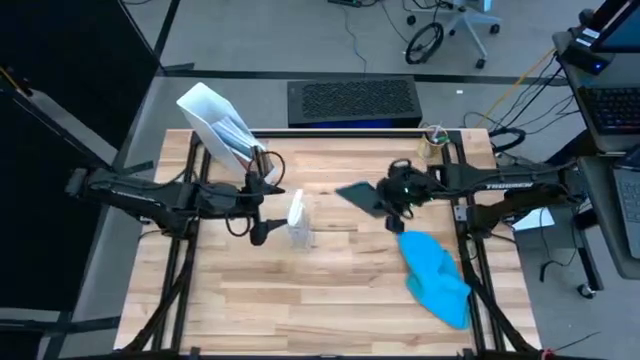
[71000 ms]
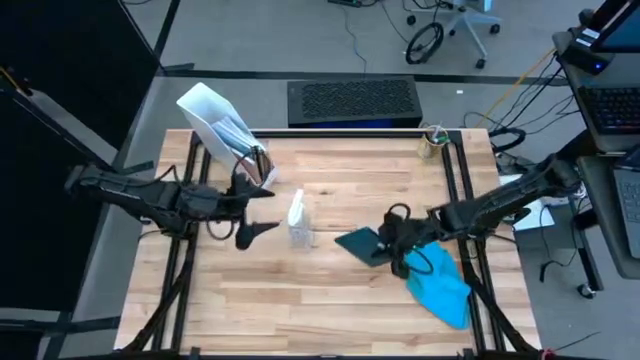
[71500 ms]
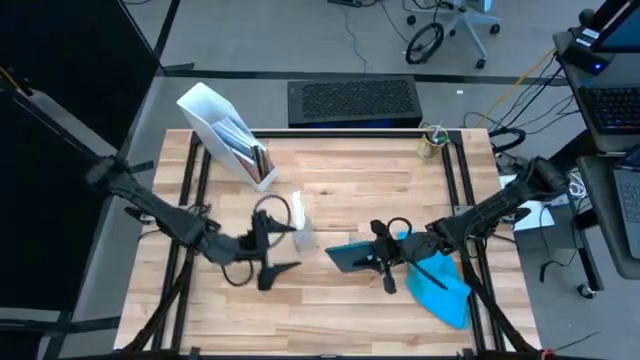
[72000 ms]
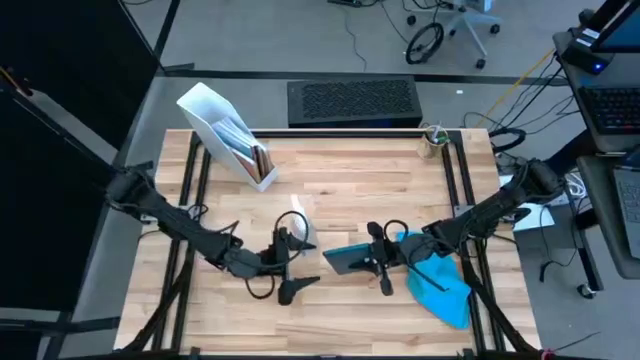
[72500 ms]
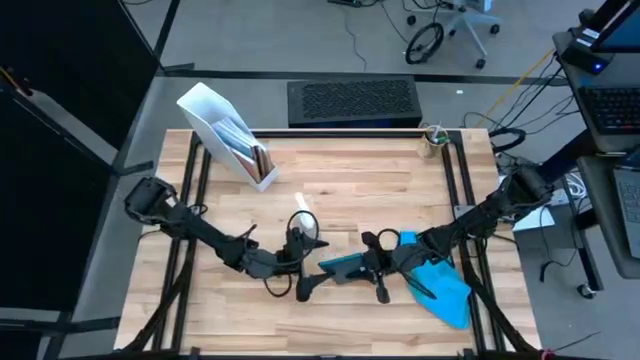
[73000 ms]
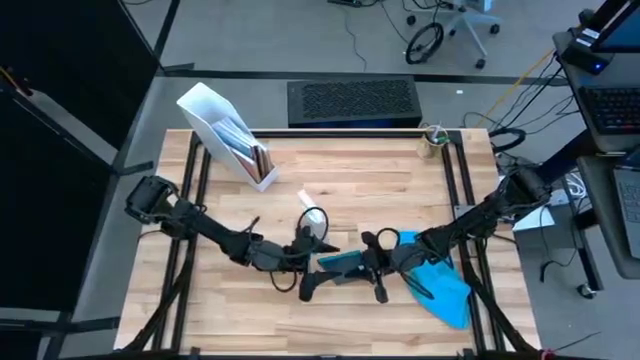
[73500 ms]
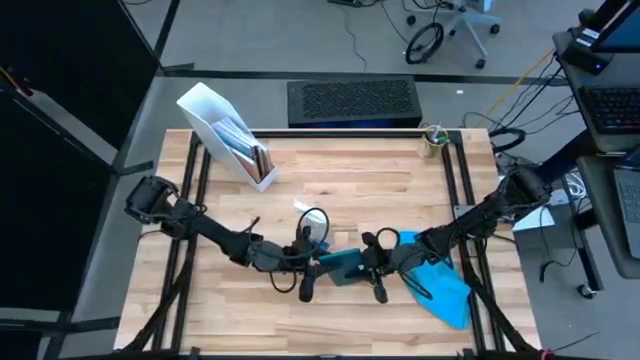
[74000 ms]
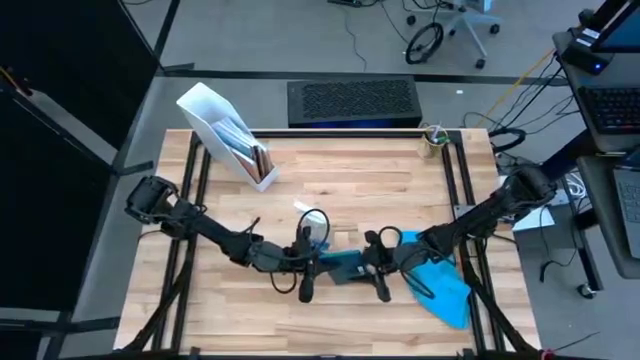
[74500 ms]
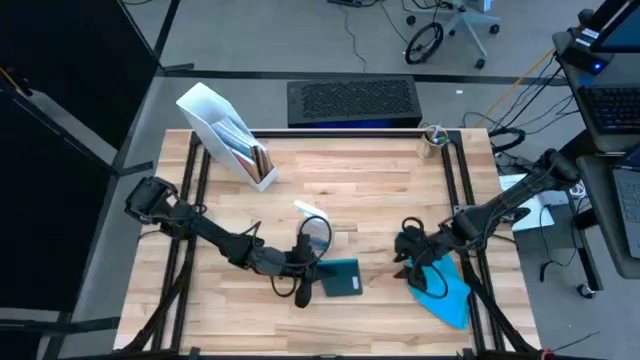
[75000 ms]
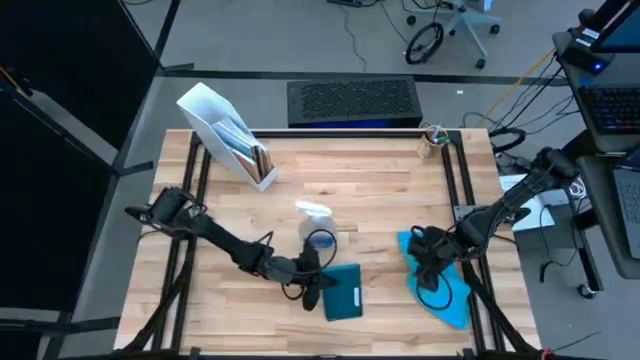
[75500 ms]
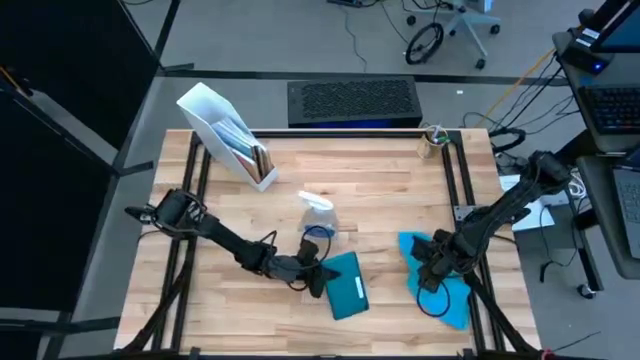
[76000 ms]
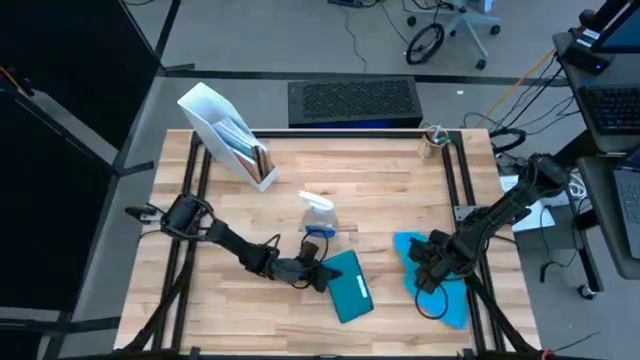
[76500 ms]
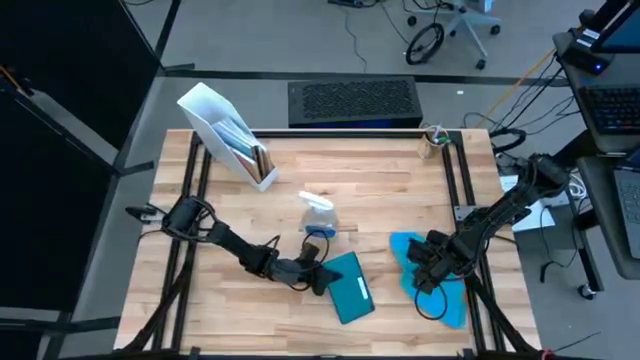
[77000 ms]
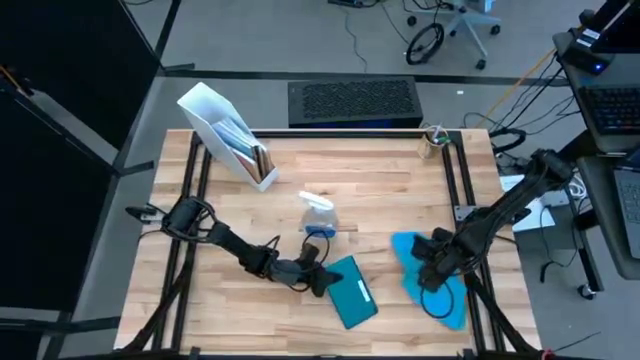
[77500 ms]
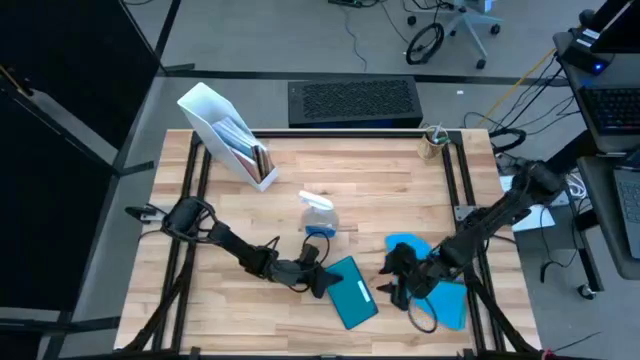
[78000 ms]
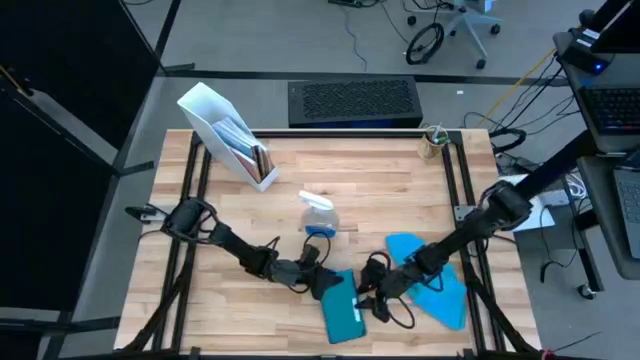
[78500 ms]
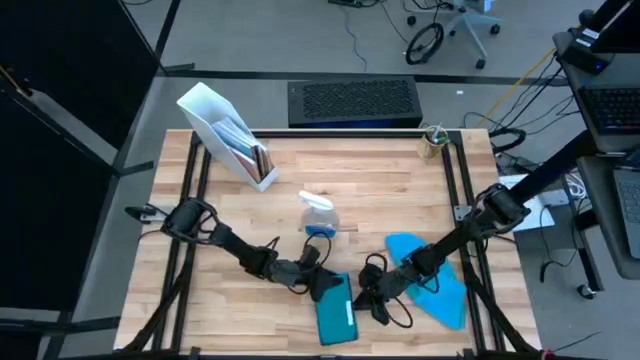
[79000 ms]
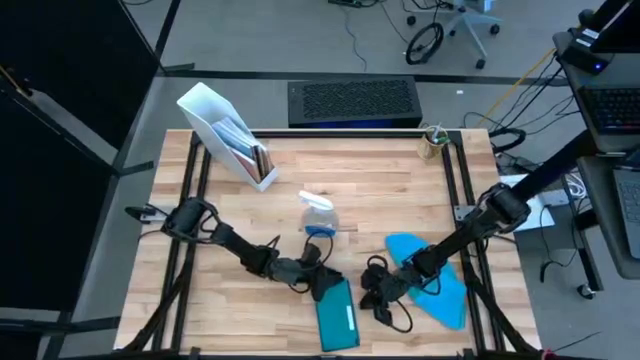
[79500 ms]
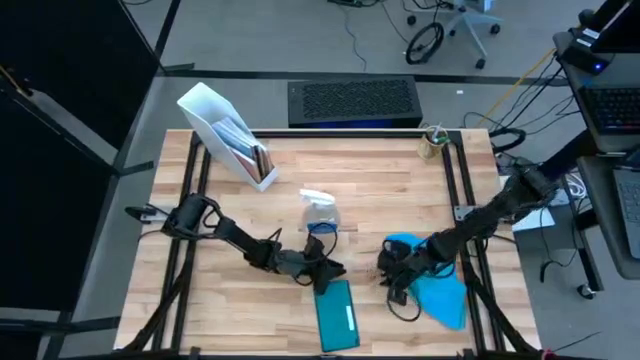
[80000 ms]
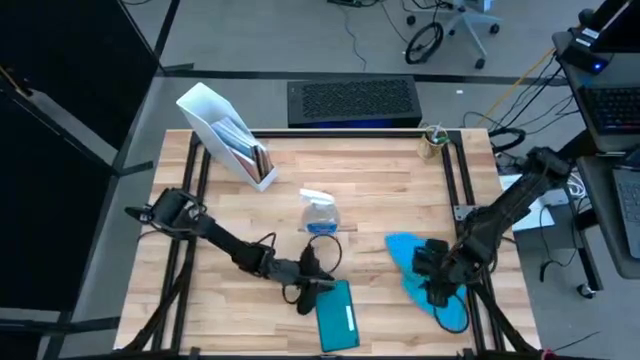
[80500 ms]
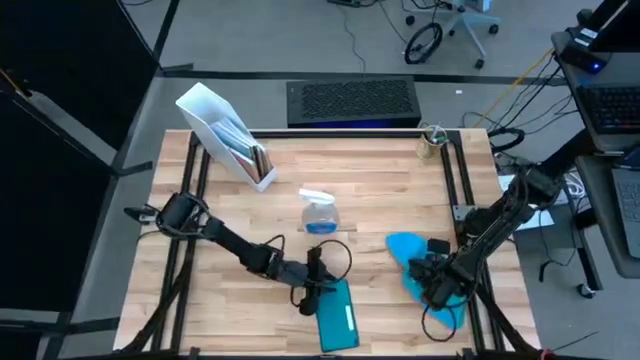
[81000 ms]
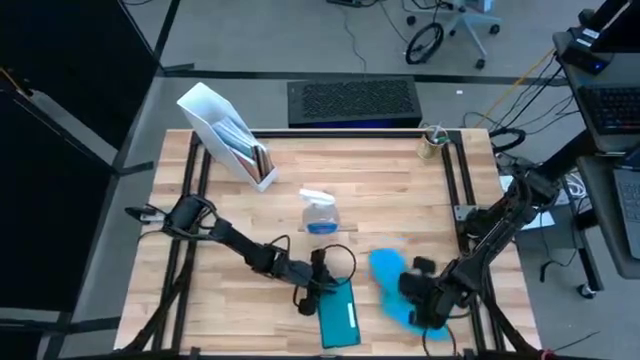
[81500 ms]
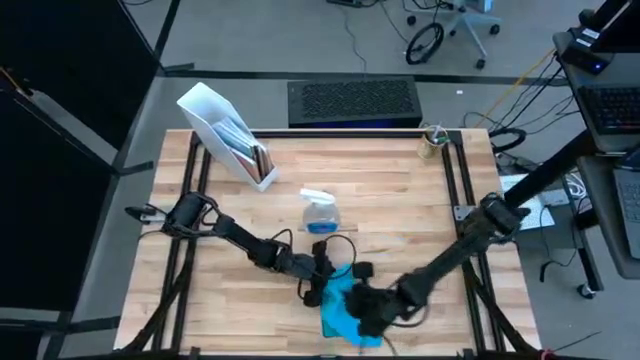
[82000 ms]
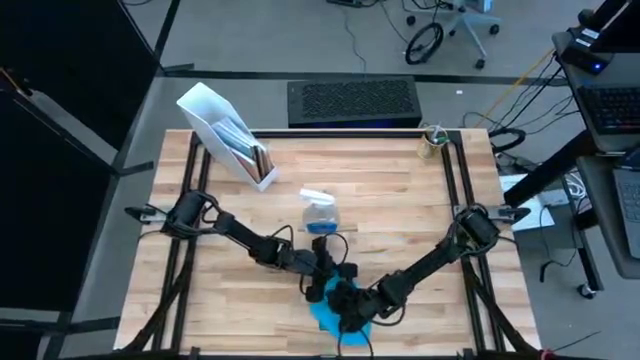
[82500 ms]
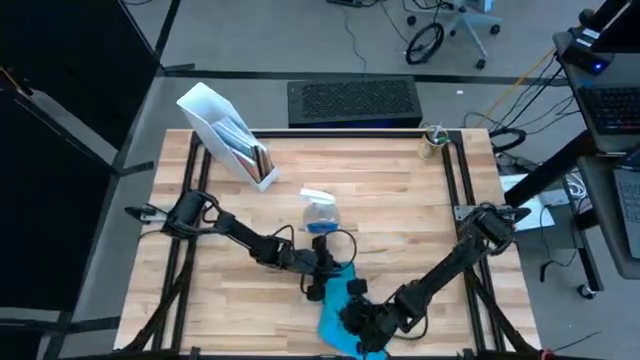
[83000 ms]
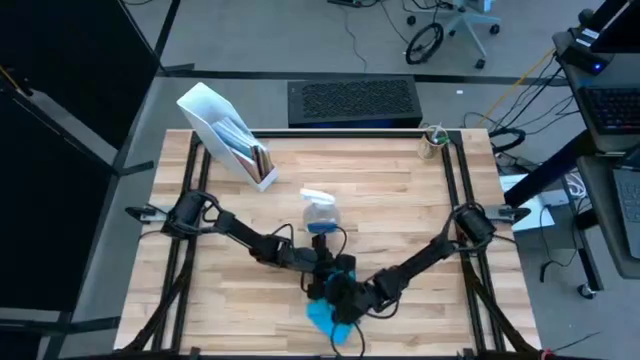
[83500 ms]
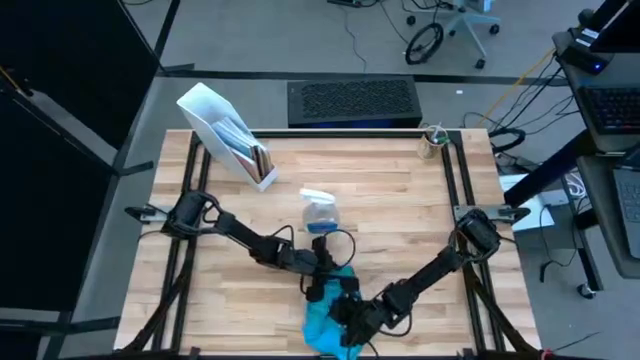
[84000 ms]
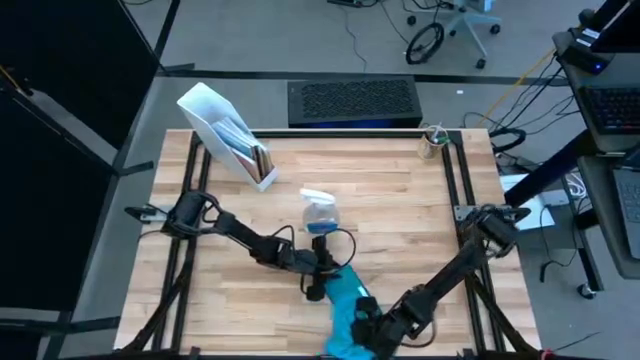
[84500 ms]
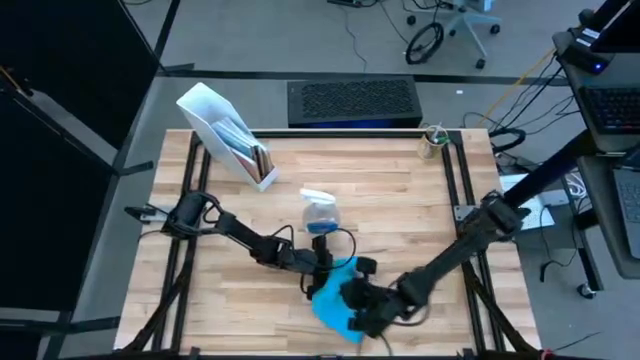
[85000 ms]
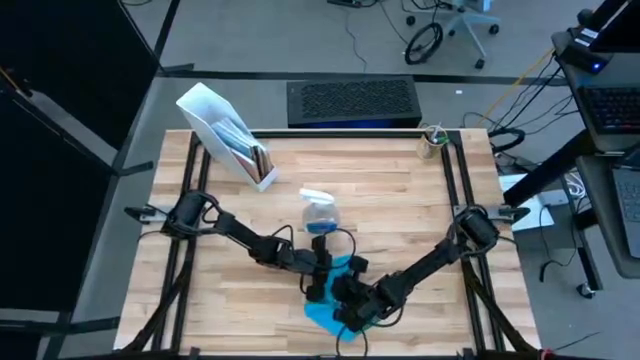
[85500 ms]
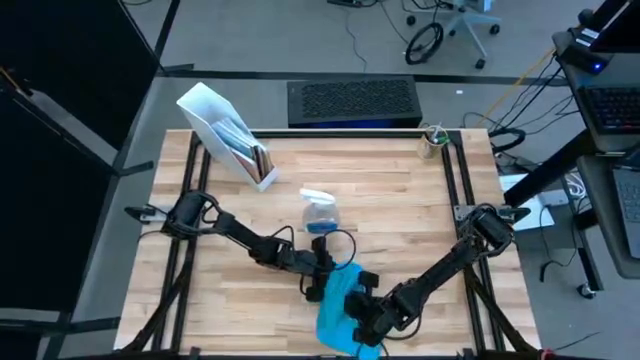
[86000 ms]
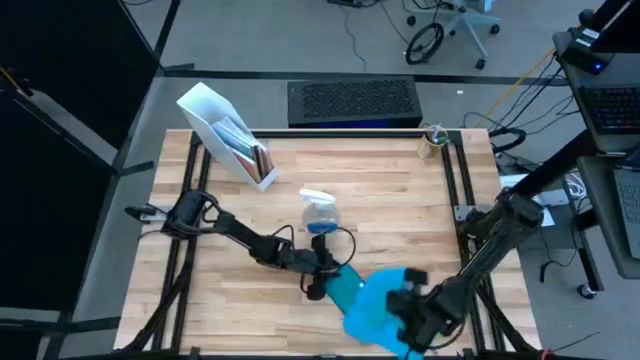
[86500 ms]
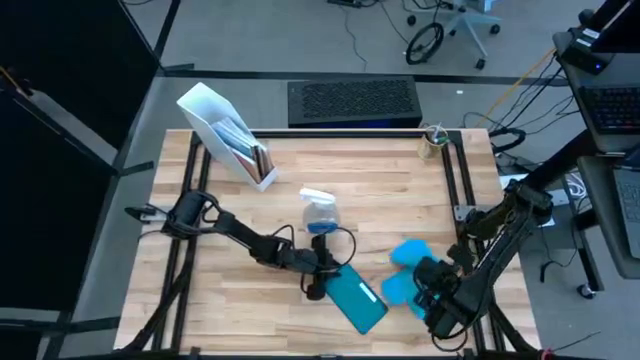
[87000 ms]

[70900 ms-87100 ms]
Task: Apply microfiber cloth
Wipe the back of the blue tablet with the blue microfiber cloth

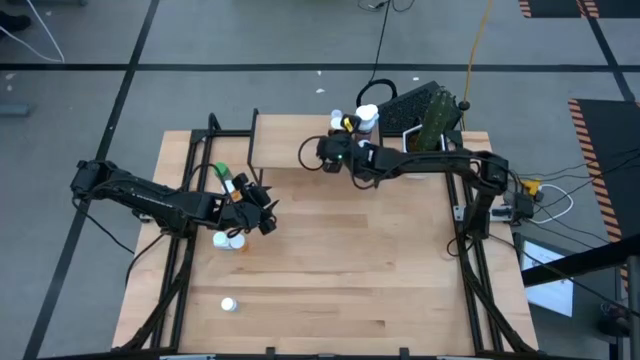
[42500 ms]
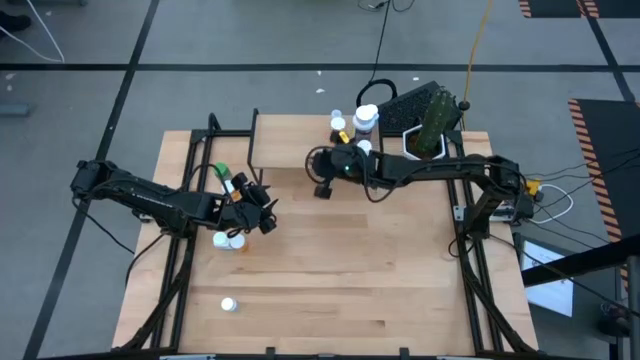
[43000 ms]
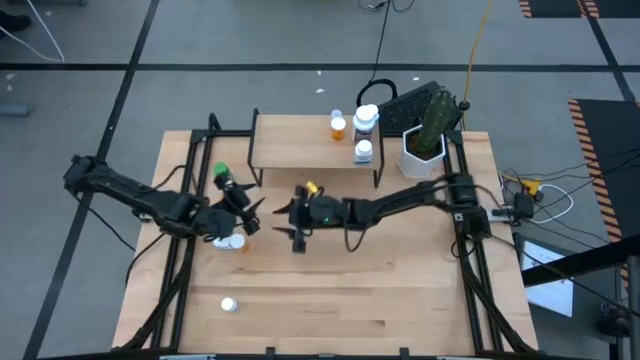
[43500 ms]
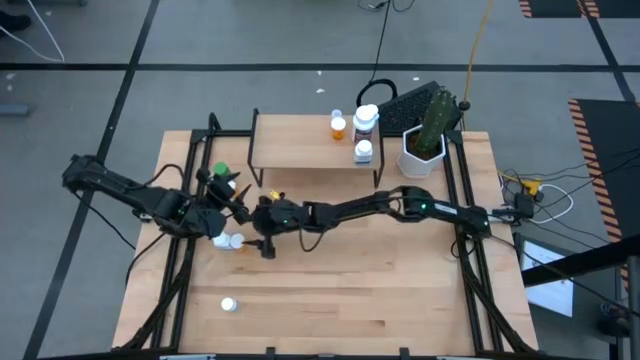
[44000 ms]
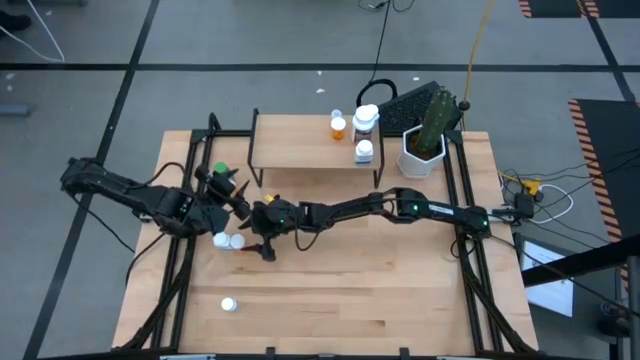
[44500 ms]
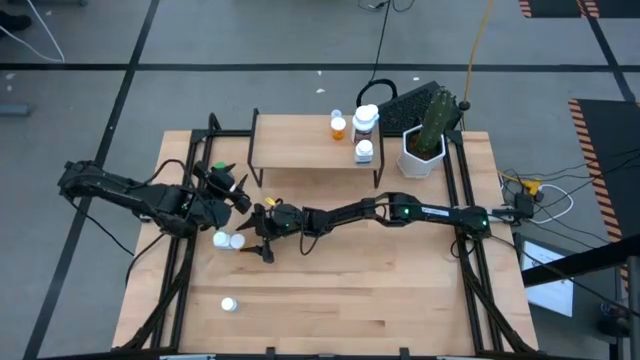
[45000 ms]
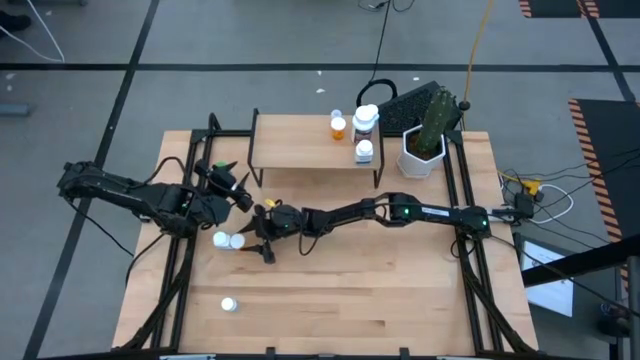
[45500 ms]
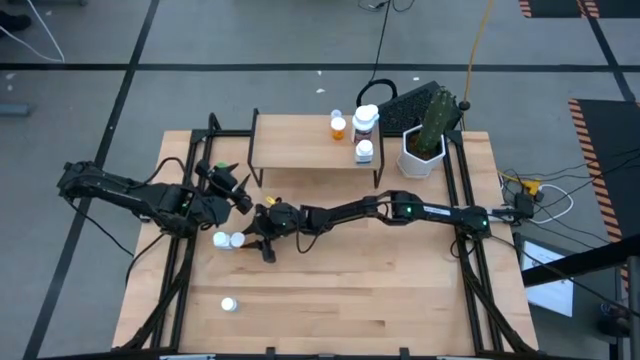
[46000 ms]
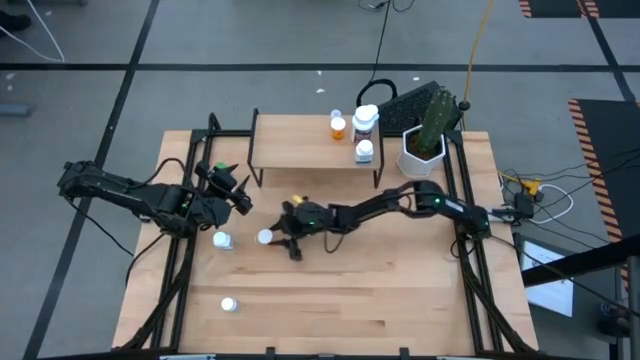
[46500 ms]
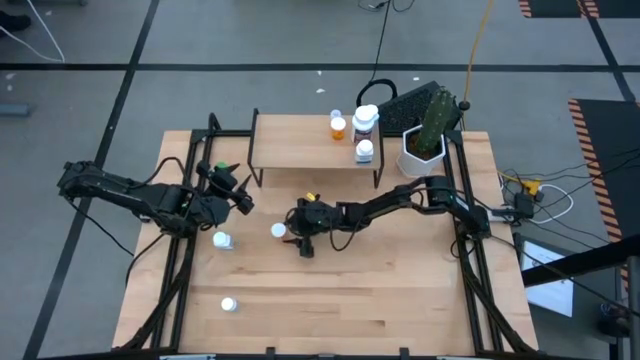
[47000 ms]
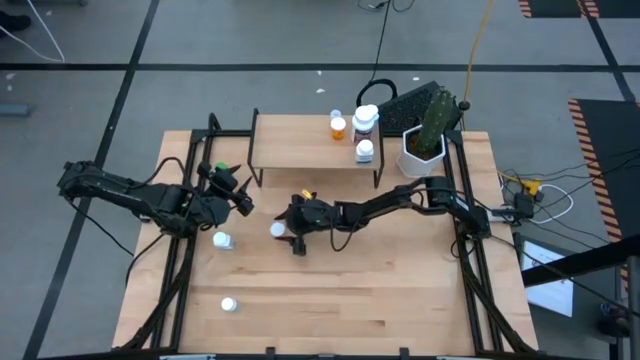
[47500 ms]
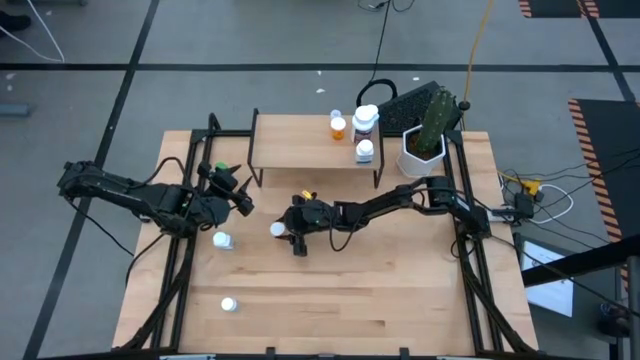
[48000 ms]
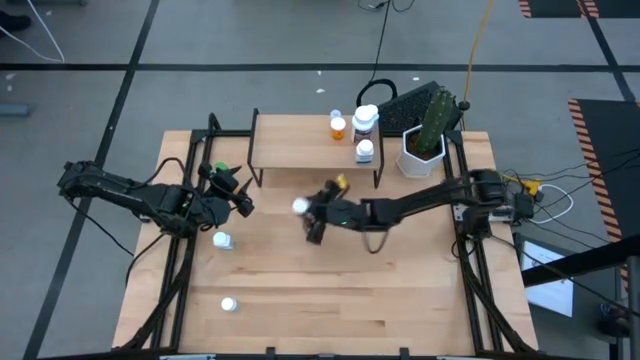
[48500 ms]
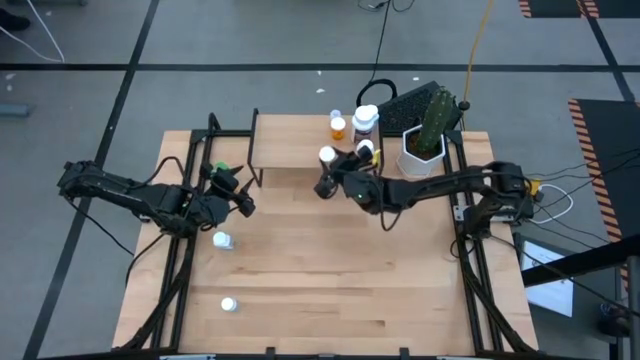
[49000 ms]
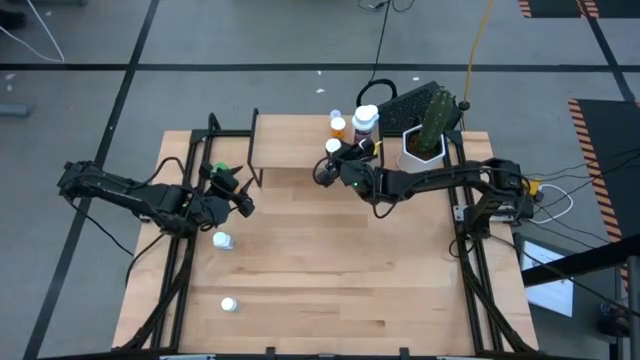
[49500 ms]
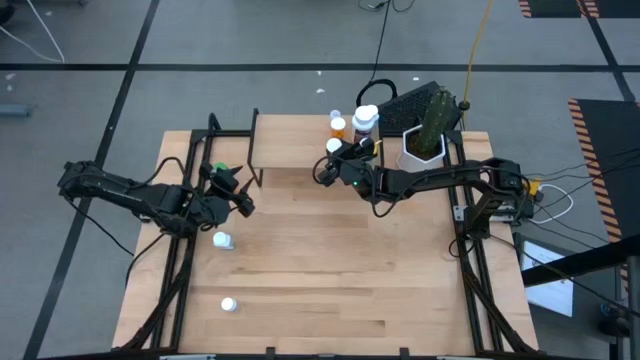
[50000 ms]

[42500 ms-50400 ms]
Task: Pick and place medicine bottles onto shelf by color
Put the bottom orange medicine bottle on the shelf
